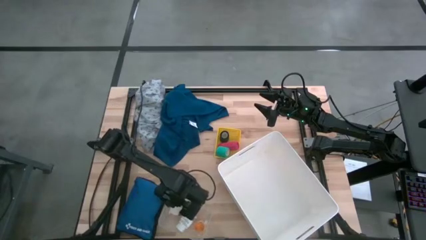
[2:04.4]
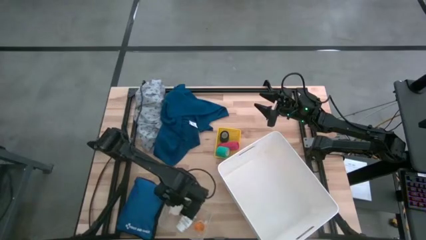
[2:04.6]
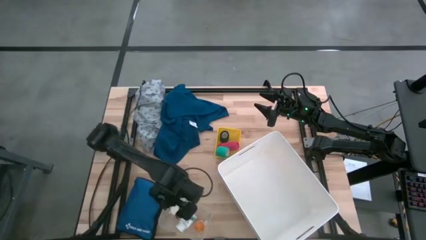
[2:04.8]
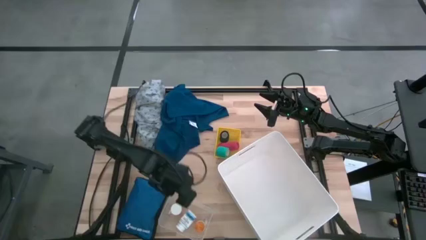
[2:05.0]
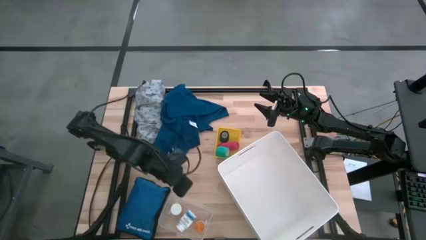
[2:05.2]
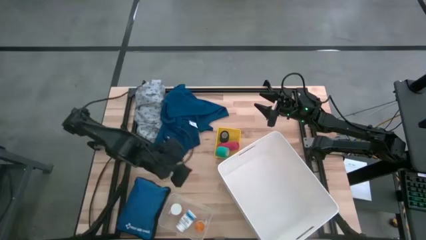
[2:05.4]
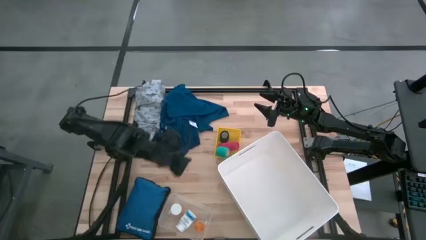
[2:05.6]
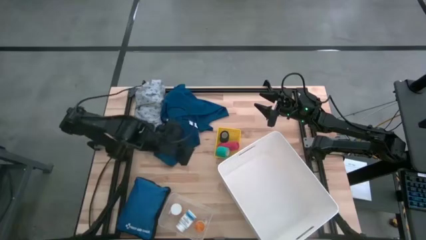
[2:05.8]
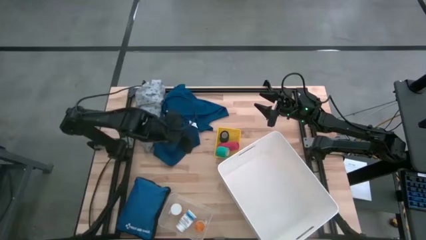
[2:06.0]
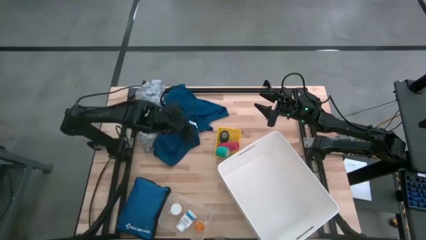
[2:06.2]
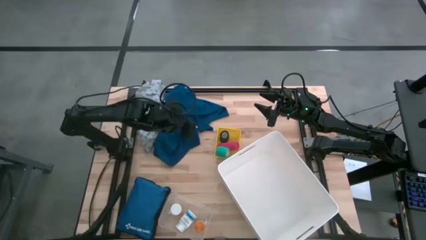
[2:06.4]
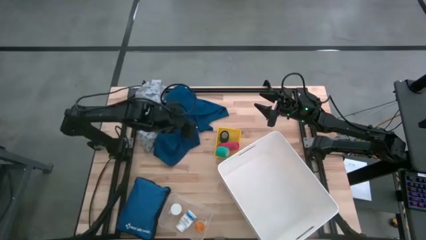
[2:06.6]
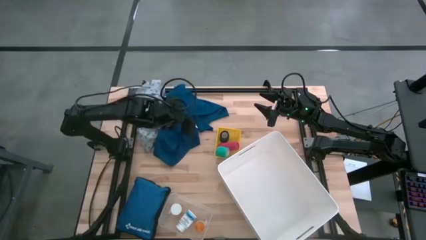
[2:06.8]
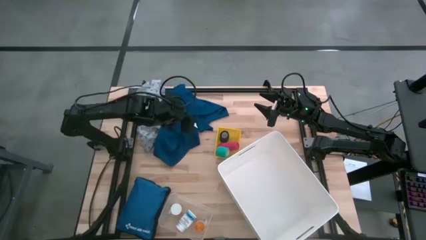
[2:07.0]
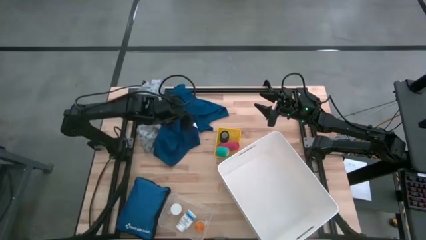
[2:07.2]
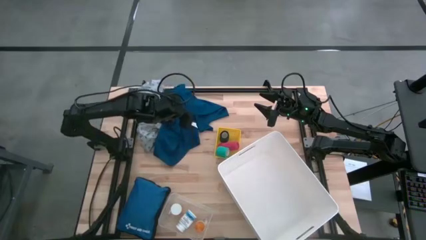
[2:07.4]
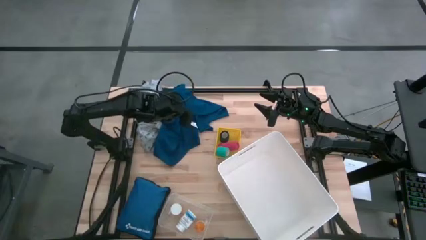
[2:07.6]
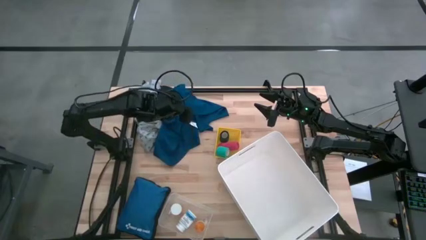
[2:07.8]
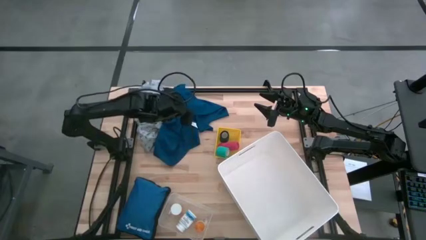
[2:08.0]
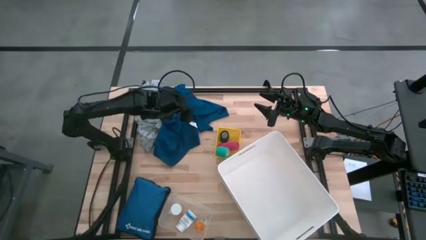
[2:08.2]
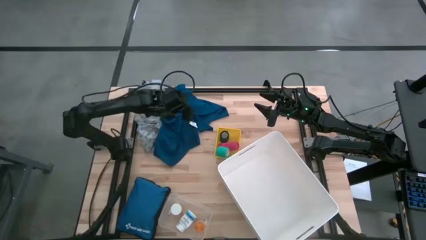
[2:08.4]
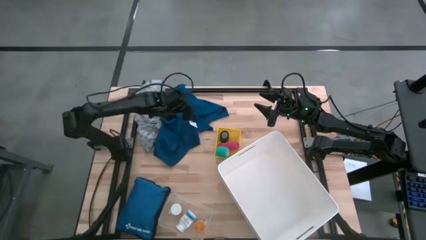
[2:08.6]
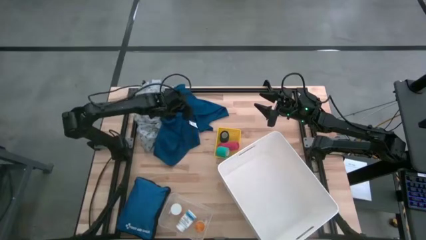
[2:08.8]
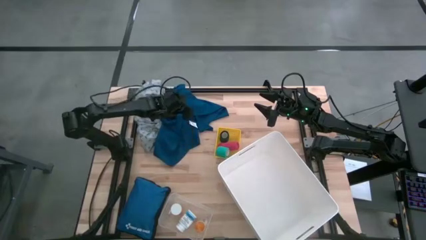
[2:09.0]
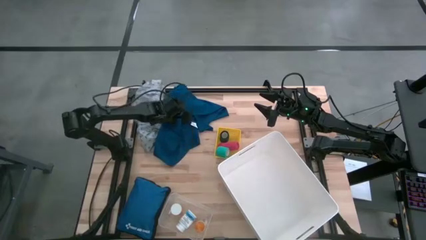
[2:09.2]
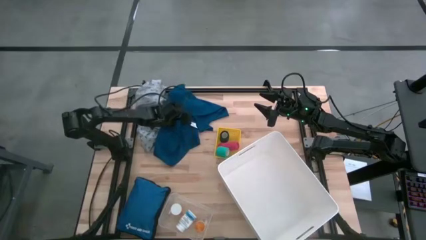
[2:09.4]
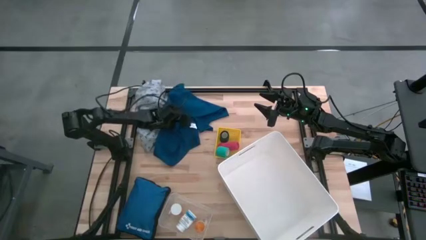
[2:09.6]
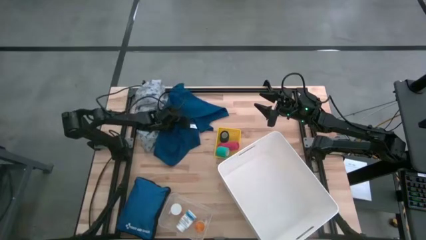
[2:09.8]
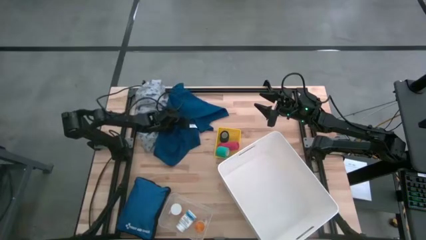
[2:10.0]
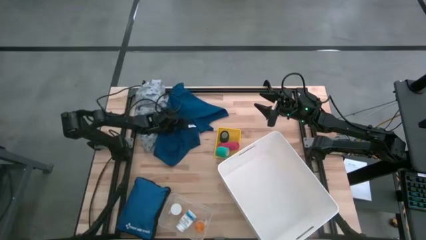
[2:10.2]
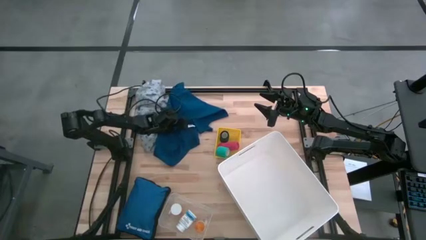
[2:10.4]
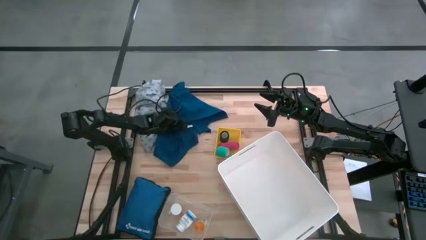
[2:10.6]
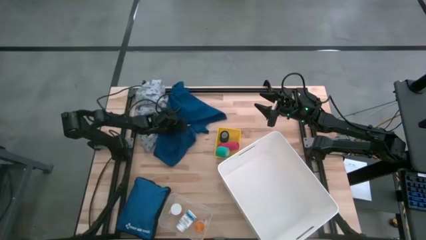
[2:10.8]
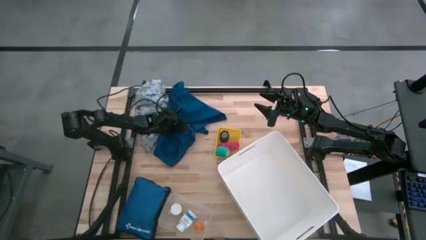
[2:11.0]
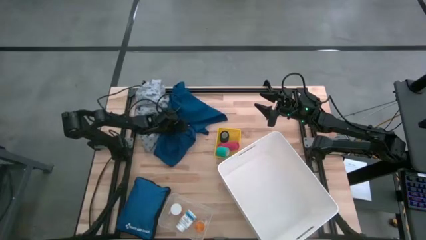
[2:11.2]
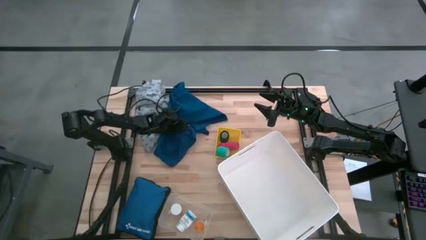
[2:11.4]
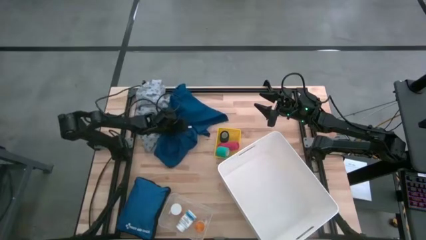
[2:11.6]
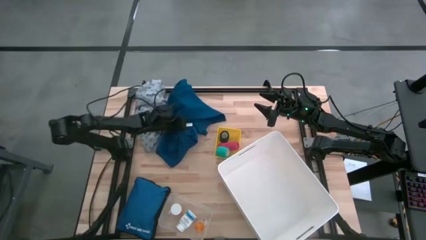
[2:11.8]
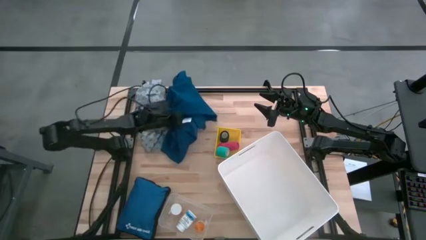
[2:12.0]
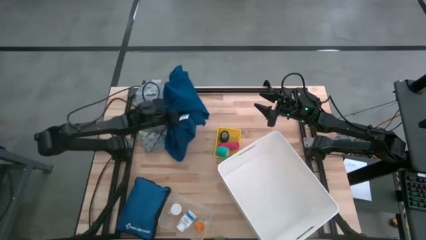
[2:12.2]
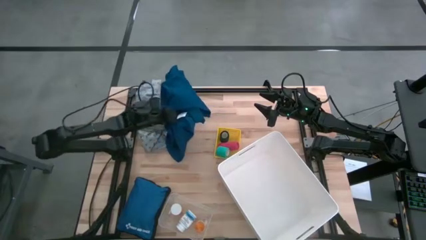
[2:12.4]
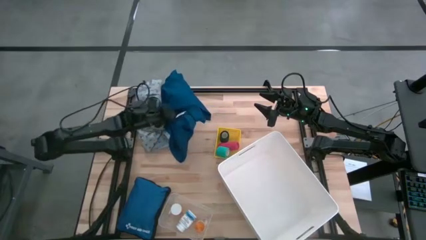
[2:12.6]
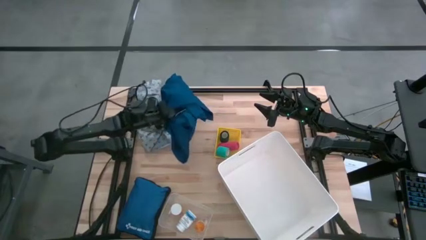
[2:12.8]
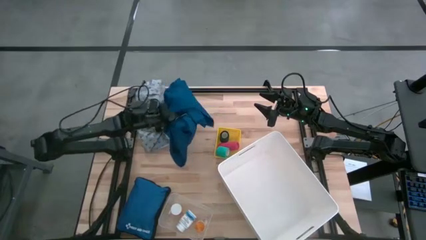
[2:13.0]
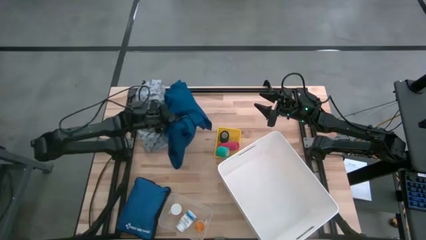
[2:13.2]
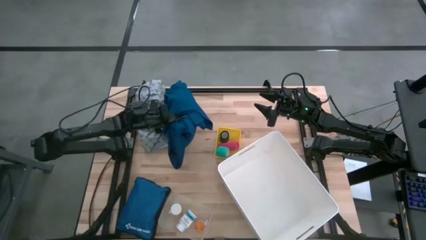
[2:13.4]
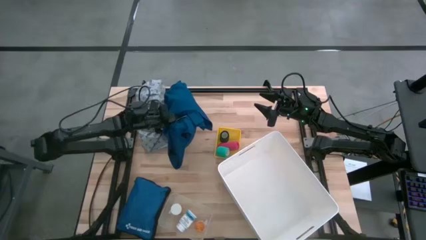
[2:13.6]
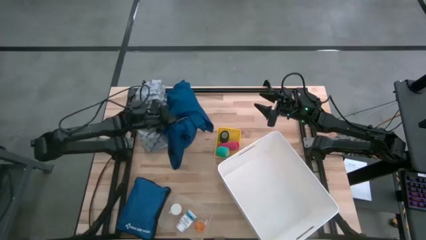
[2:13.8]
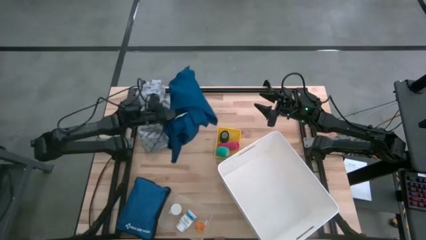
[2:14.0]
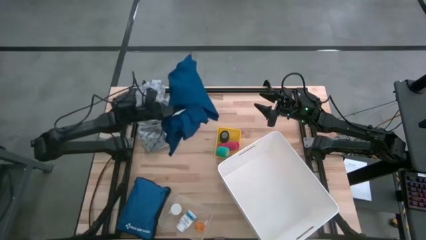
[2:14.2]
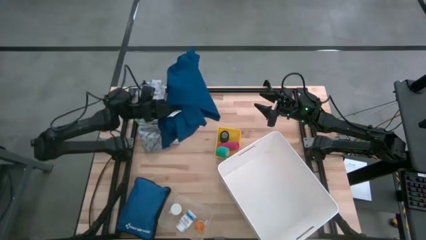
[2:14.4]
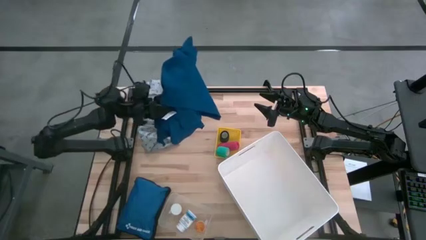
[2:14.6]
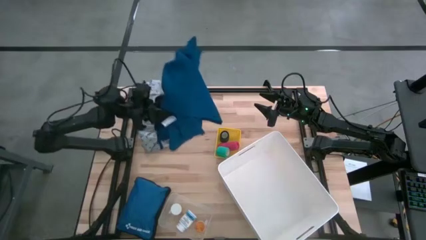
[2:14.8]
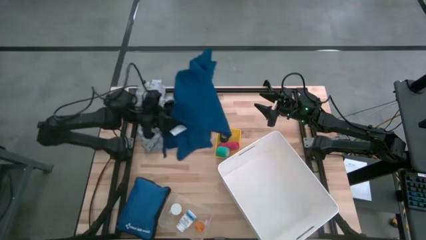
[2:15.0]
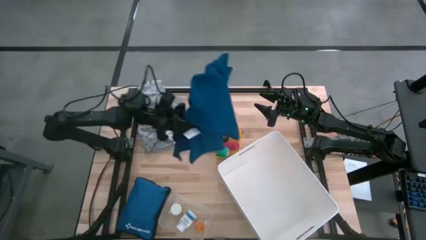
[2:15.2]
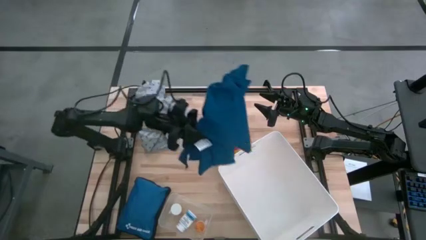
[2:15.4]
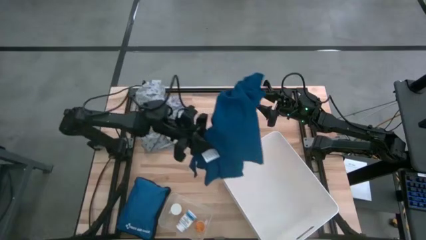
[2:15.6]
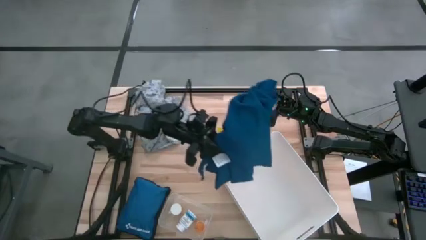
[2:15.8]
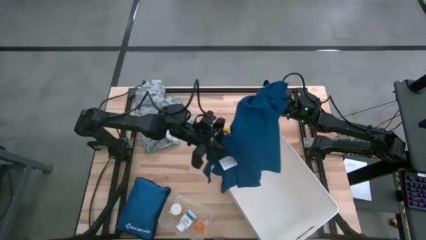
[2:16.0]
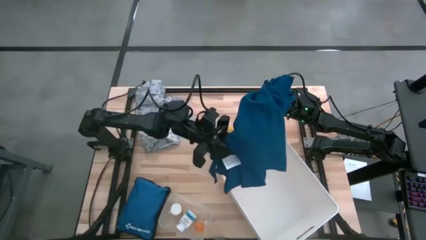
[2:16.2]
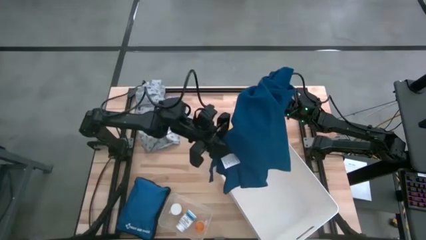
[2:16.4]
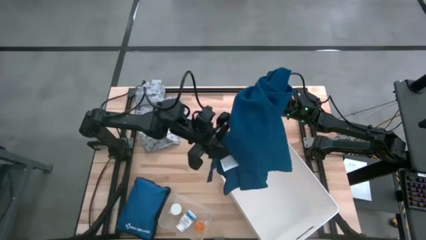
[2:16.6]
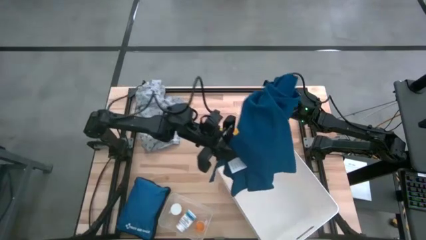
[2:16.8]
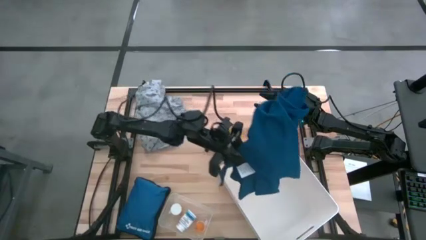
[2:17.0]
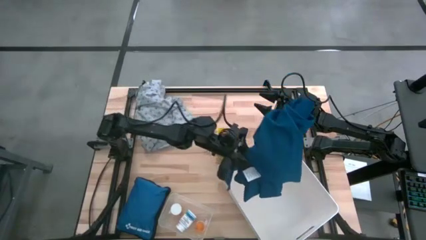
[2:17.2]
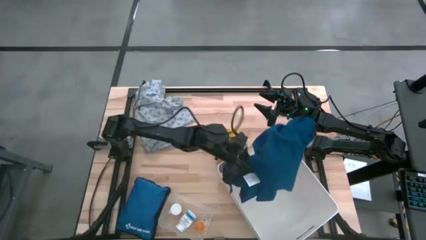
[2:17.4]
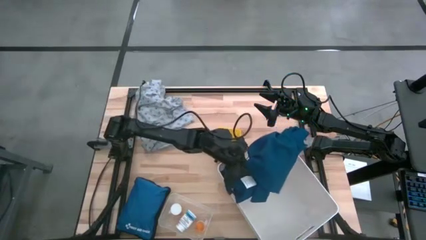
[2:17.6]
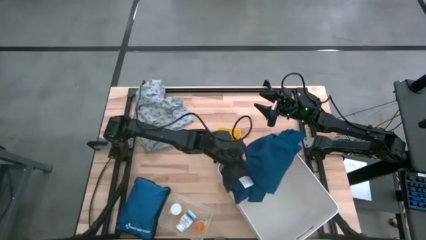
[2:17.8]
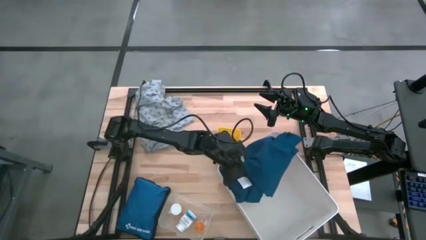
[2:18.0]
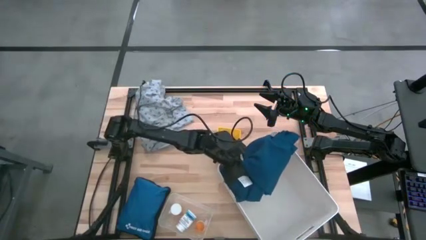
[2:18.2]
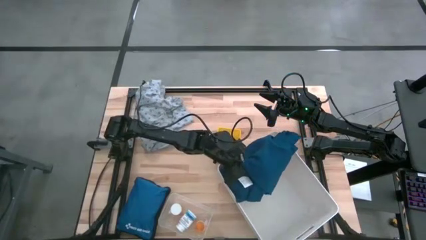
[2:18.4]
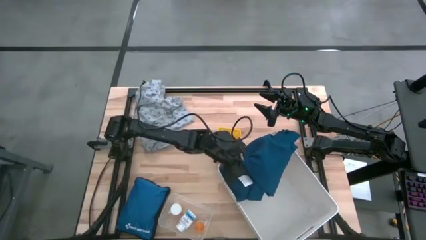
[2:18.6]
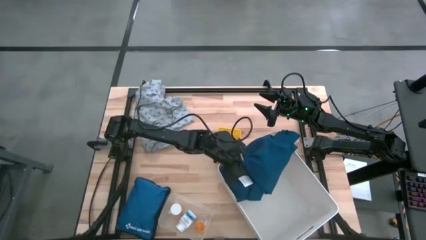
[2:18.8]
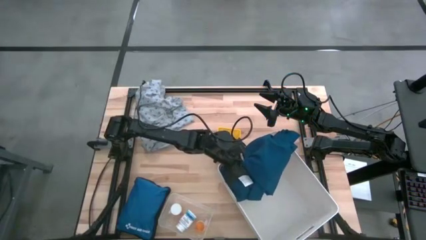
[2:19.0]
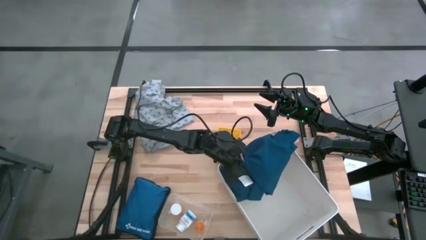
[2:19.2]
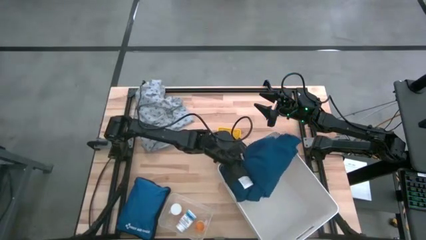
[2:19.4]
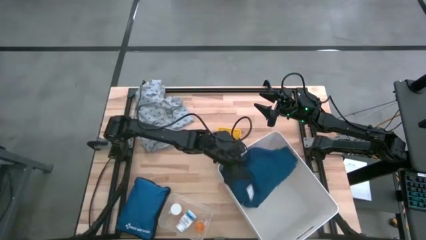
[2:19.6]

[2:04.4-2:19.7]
Task: Pick & place medical supplies in basket/bin
Put the blue patient gown into the white bin

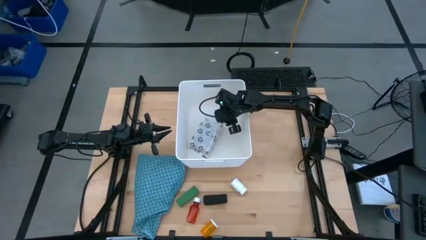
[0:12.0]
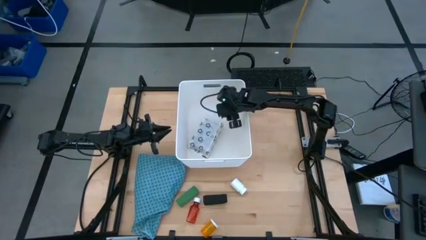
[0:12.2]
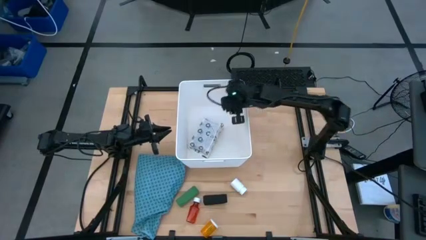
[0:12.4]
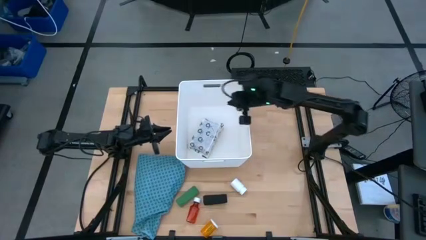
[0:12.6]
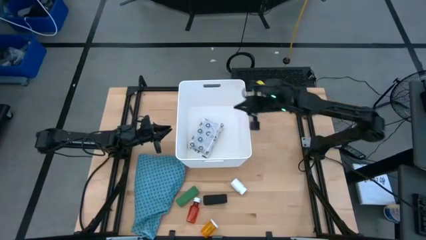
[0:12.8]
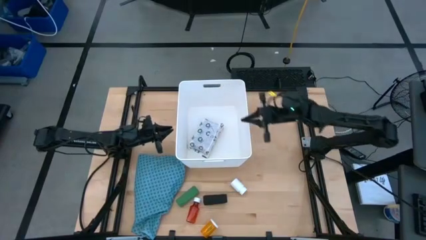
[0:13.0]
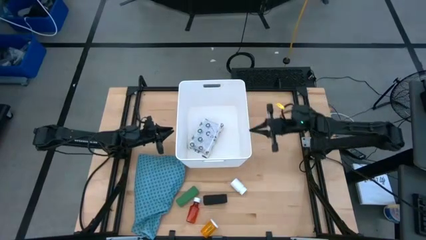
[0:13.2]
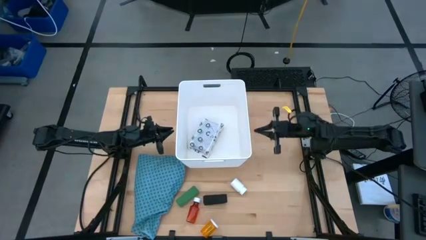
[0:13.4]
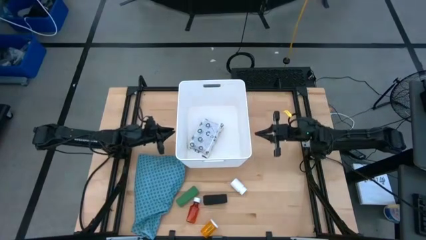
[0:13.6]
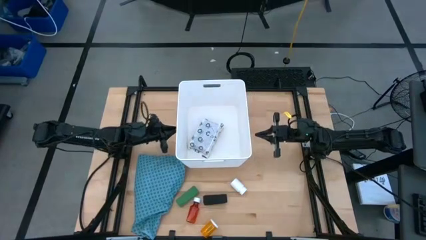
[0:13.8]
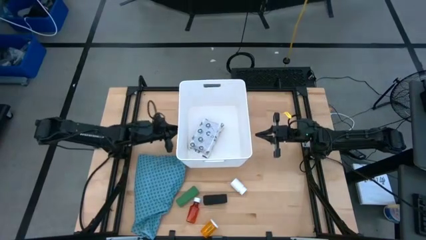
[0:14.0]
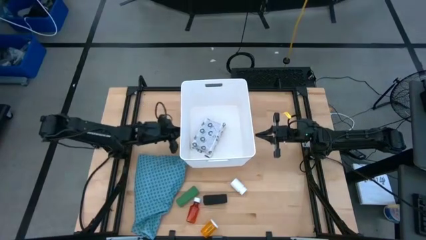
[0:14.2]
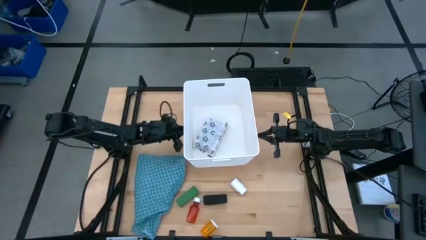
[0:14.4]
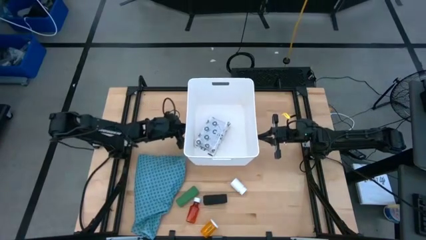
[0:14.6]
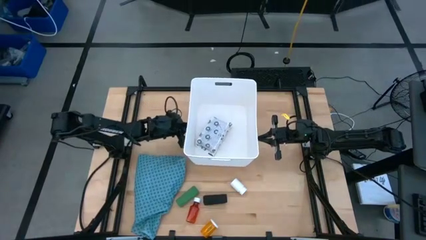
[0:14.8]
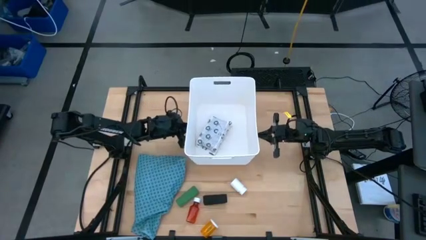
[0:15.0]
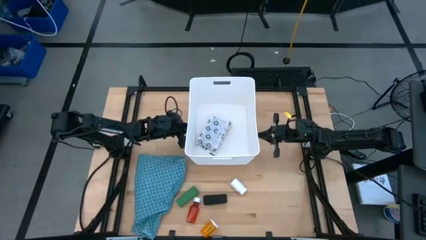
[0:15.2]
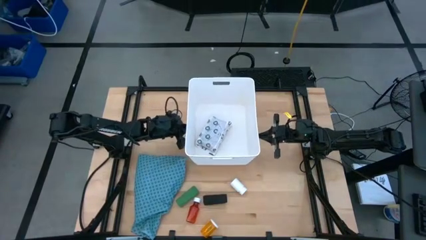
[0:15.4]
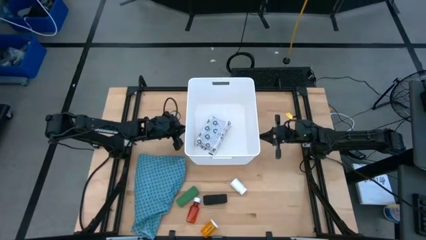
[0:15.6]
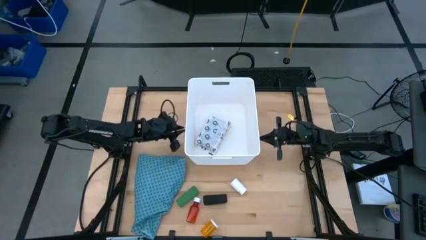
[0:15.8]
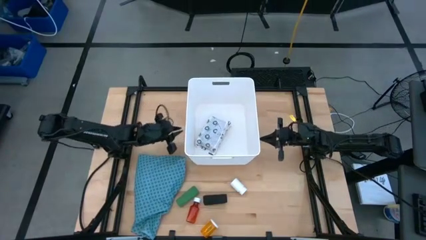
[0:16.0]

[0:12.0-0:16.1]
Task: Pick & place medical supplies in basket/bin
Adjust the white bin
